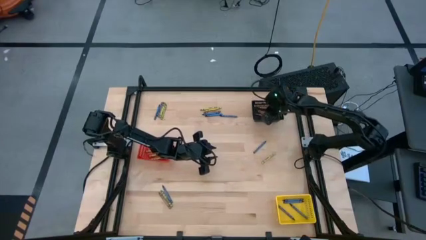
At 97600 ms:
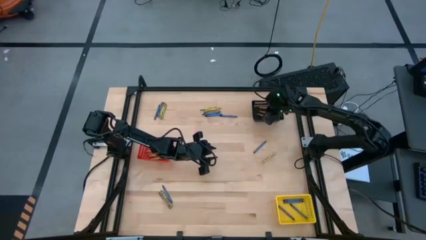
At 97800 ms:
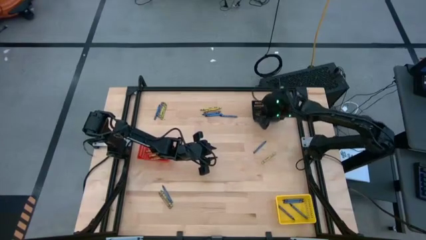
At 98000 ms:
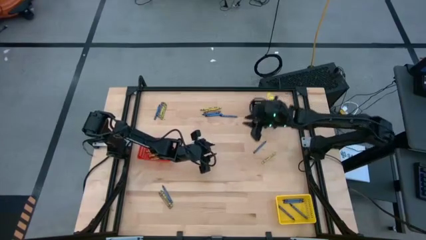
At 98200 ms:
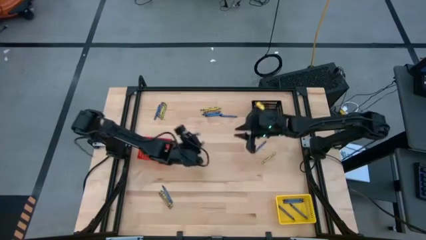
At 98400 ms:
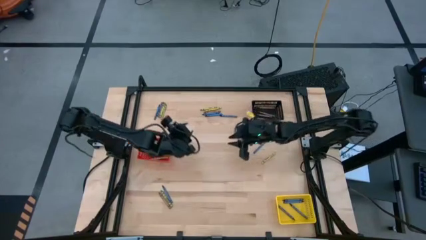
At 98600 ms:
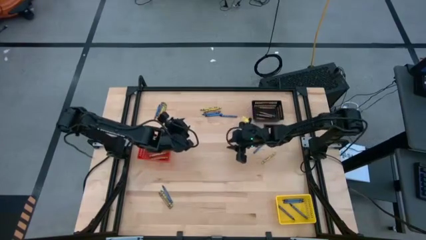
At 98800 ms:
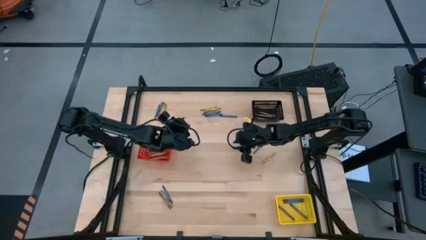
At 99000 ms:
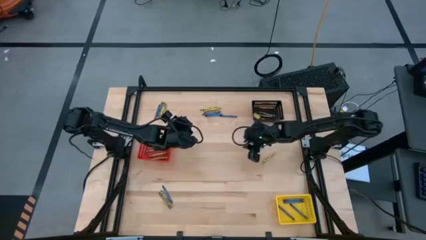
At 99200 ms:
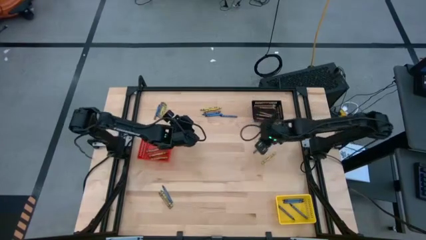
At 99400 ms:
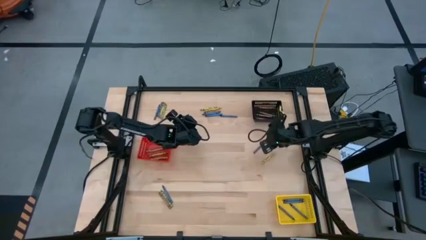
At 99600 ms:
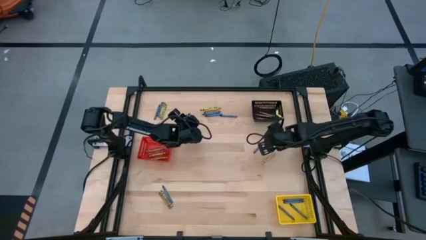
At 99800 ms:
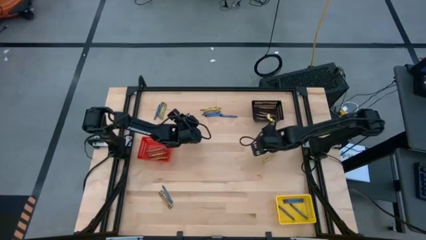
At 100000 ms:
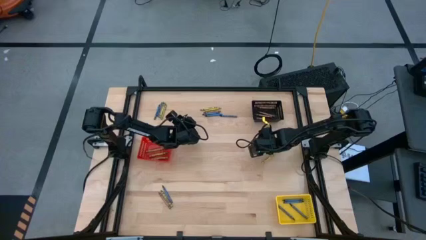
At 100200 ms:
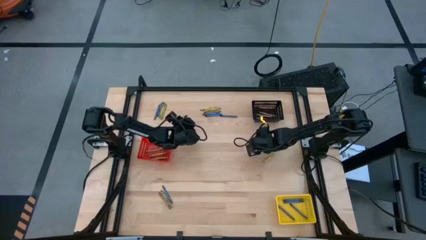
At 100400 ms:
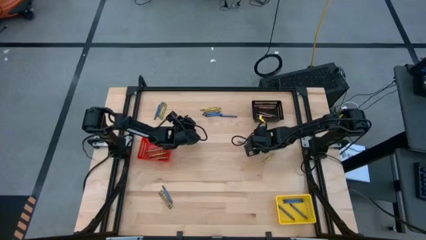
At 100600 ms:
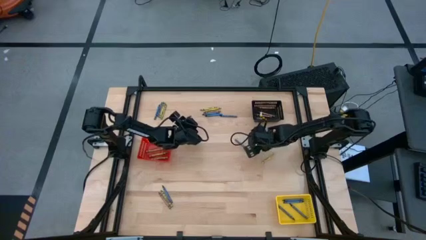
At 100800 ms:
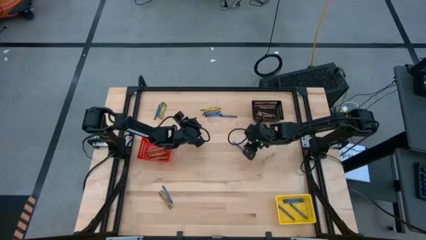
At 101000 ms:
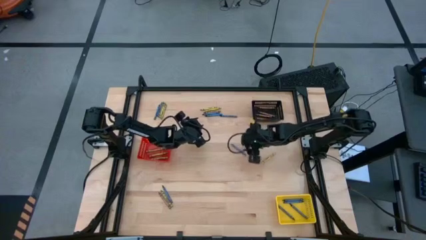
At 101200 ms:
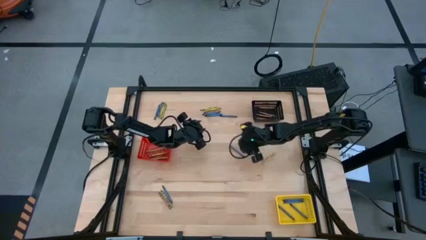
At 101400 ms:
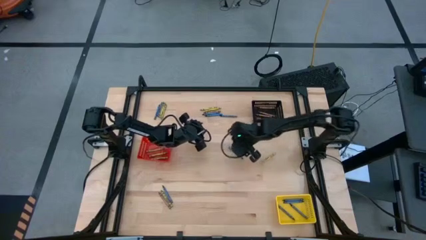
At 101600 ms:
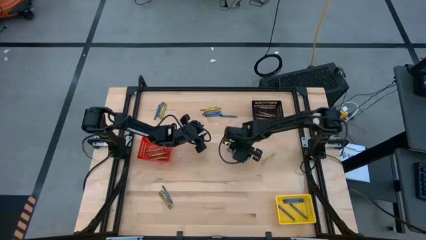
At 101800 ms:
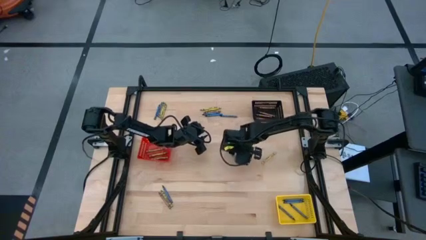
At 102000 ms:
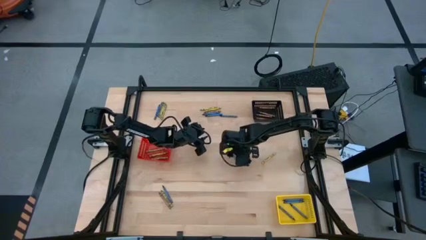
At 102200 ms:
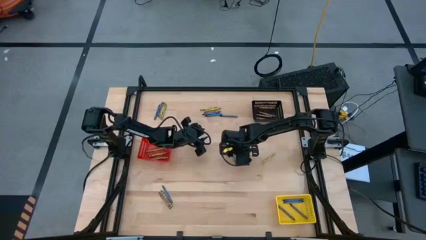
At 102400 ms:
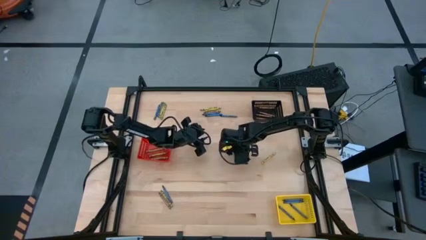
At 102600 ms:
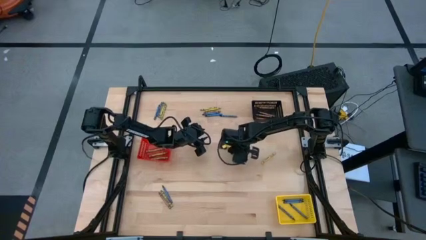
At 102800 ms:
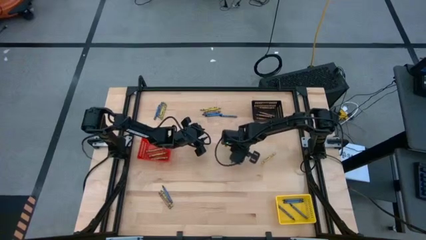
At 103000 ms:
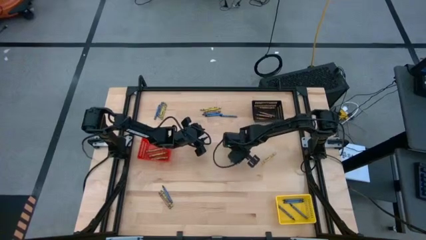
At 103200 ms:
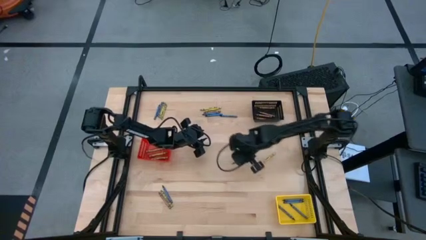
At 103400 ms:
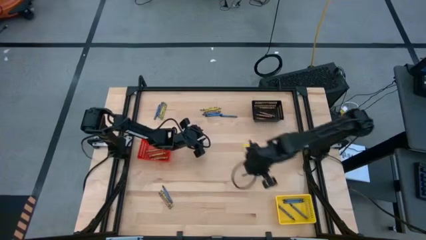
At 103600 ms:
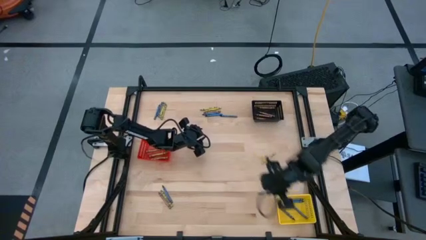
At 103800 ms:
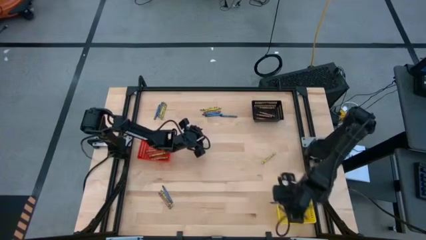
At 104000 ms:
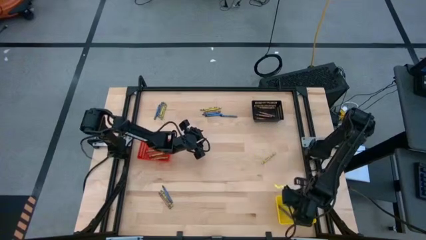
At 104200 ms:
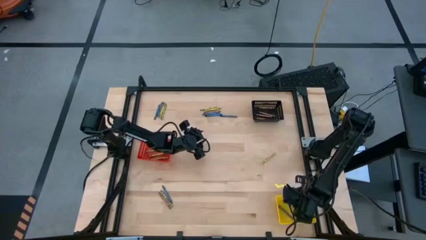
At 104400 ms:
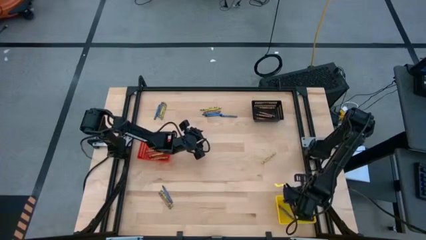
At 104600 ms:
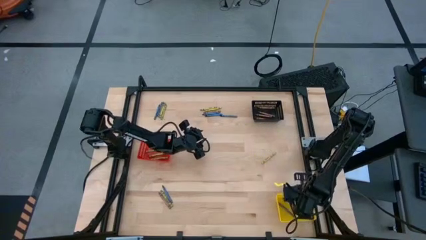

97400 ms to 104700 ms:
Task: Sort crayons
Put the blue crayon into the yellow bin

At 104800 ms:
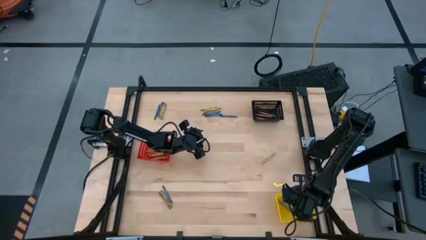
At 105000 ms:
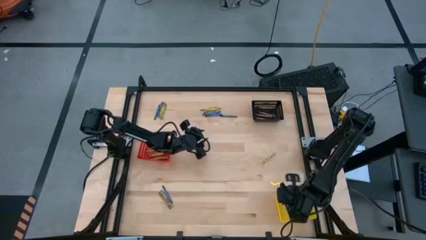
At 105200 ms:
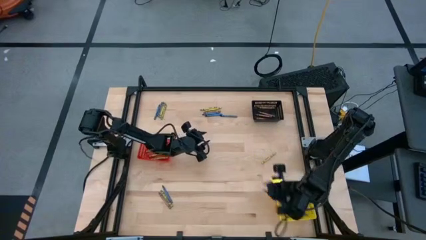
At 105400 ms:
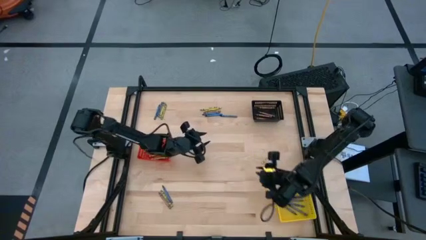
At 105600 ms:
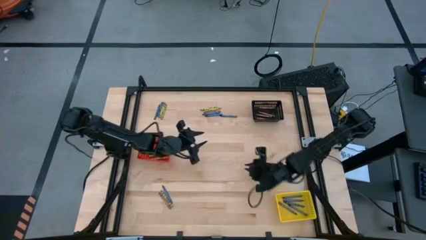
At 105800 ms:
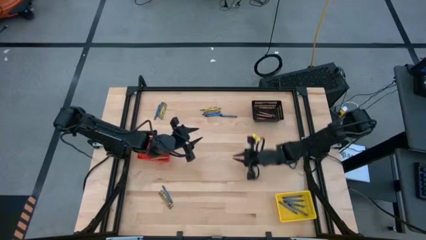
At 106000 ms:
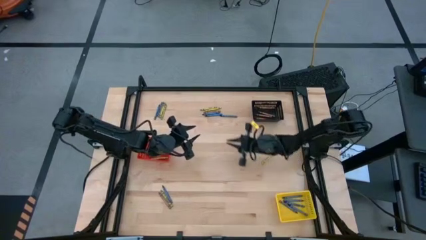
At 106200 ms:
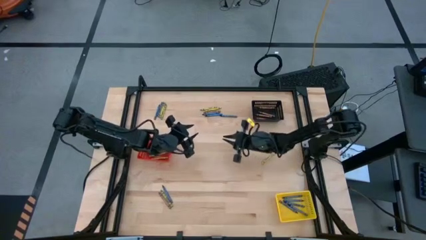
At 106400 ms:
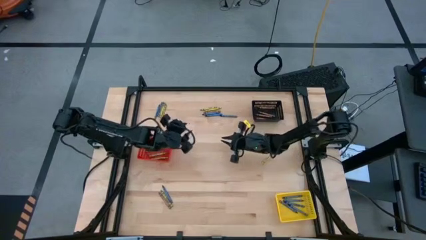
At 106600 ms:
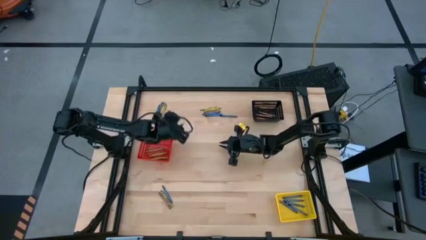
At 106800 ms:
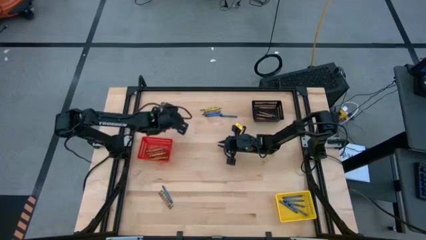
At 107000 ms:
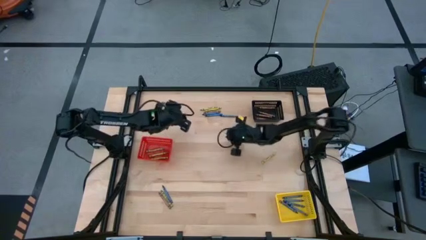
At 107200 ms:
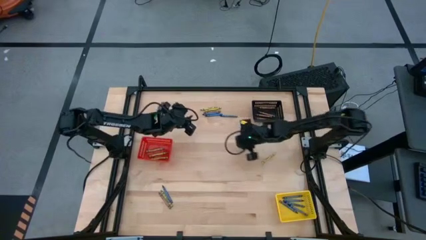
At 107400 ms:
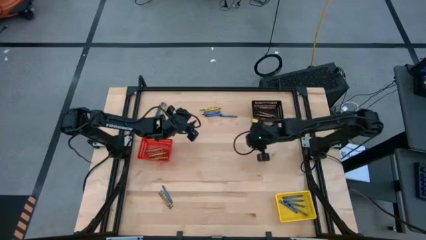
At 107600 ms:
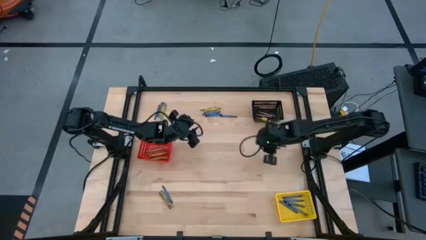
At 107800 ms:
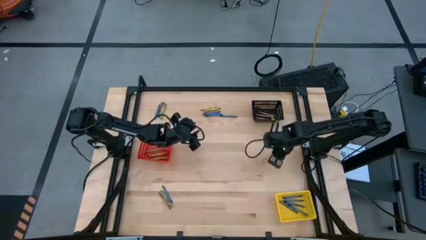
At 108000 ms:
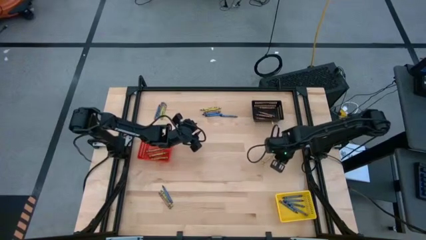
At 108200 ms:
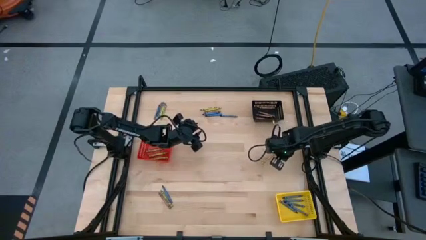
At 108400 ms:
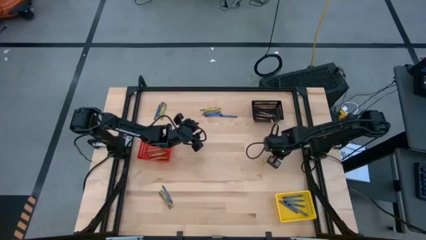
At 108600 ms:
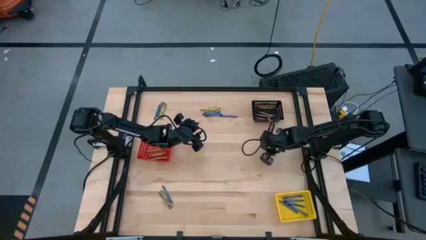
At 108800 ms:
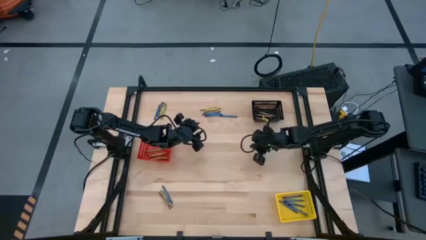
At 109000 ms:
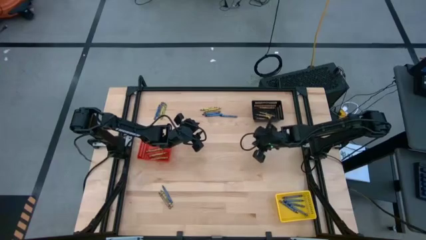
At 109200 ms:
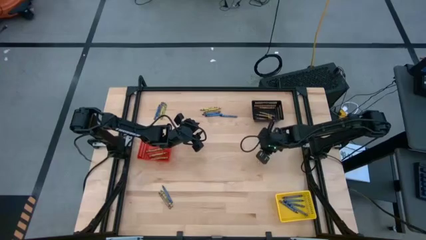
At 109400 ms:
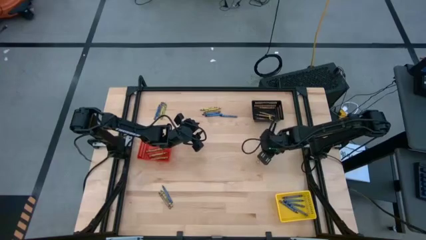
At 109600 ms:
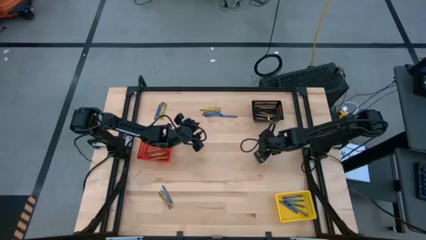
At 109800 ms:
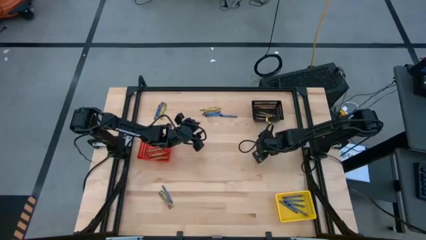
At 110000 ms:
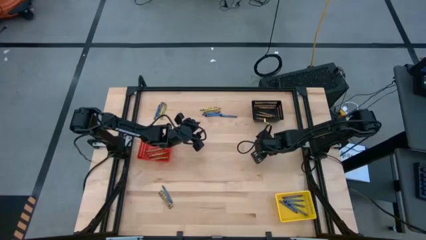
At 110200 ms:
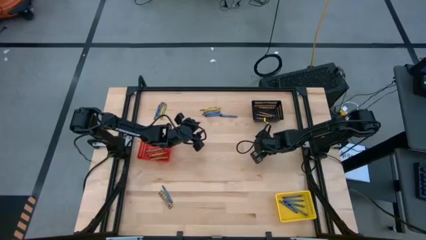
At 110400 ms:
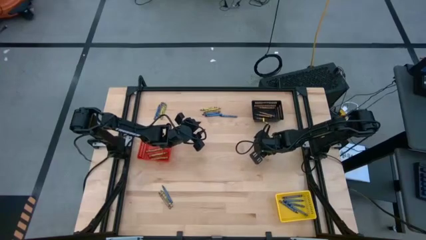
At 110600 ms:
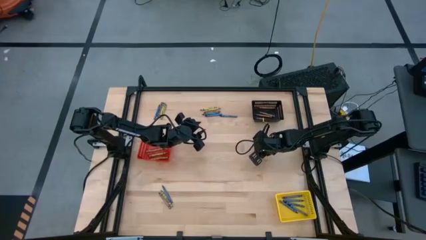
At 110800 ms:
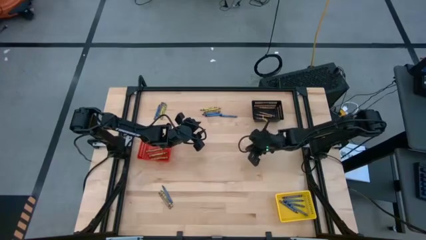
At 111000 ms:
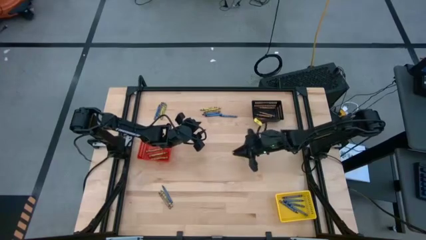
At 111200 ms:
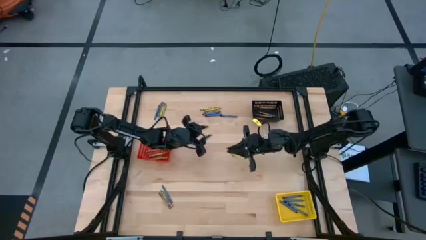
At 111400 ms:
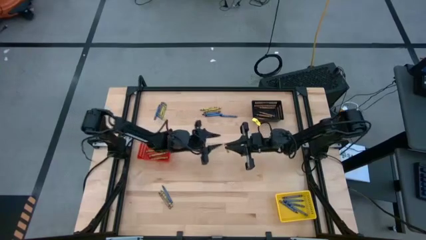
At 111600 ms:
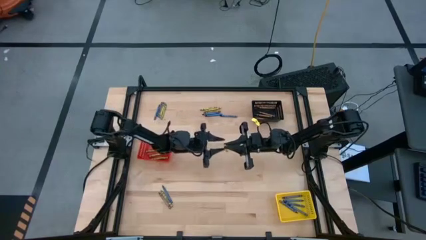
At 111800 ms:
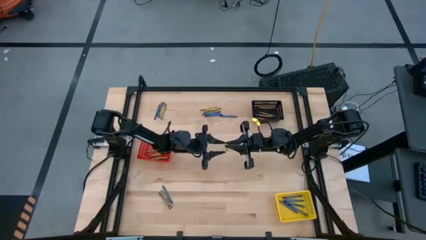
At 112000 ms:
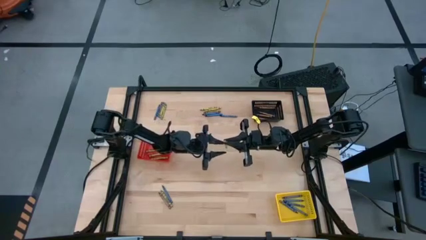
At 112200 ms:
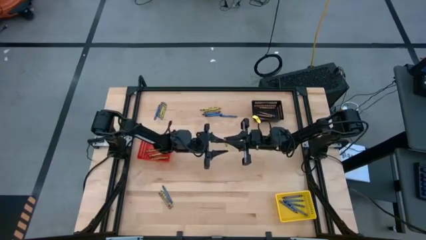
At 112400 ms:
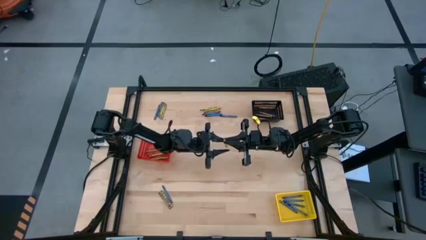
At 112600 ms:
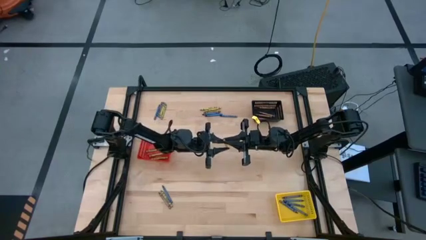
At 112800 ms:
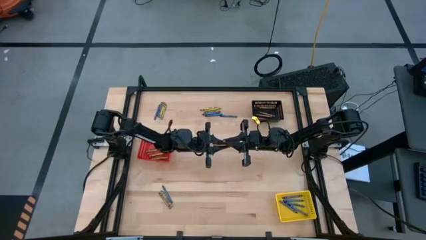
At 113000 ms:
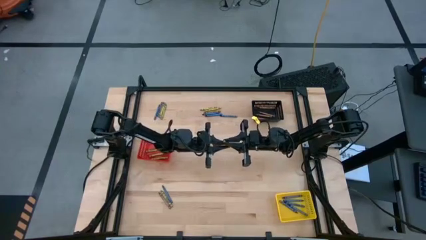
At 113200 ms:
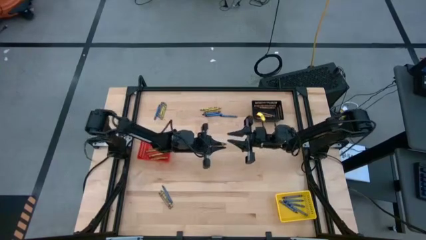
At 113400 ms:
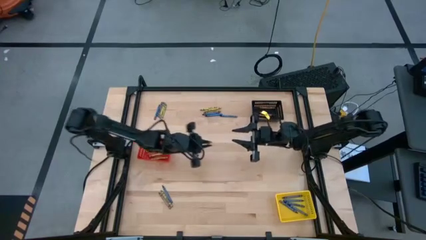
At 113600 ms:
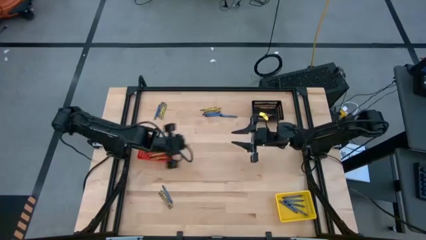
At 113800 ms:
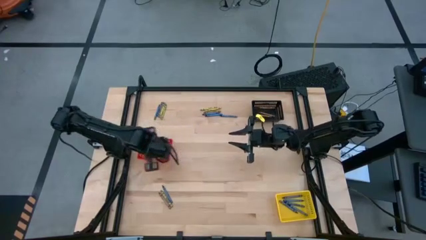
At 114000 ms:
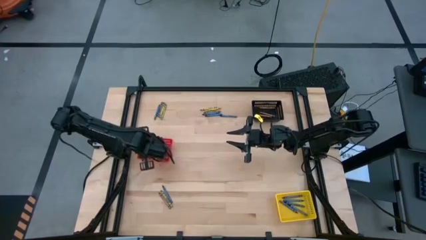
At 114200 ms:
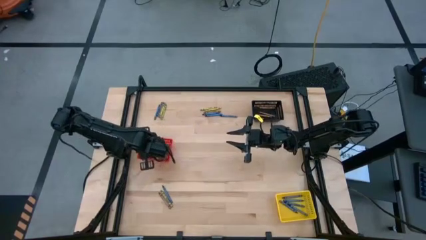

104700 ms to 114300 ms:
Put the right light green crayon into the red bin
